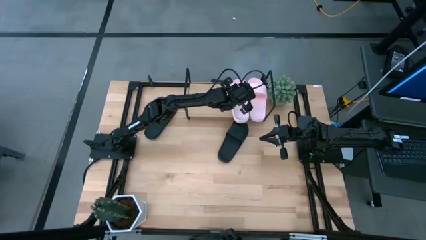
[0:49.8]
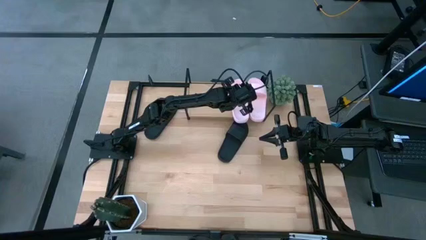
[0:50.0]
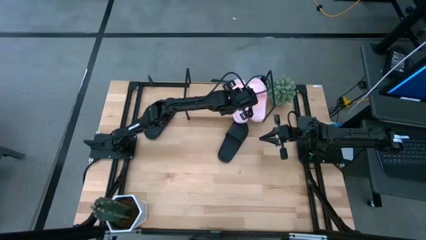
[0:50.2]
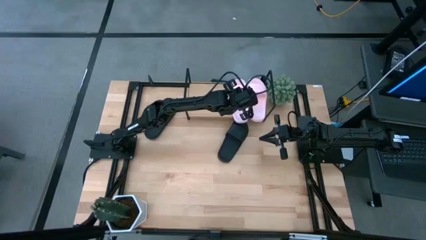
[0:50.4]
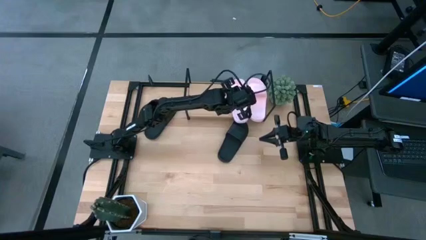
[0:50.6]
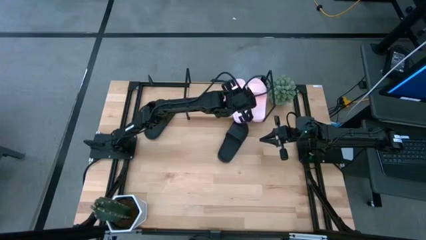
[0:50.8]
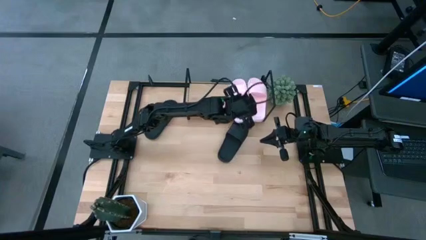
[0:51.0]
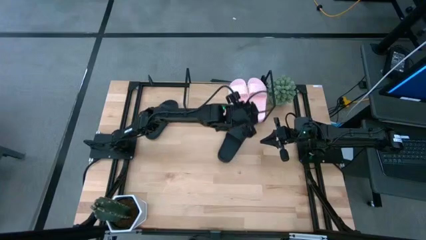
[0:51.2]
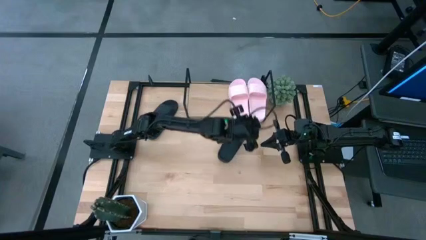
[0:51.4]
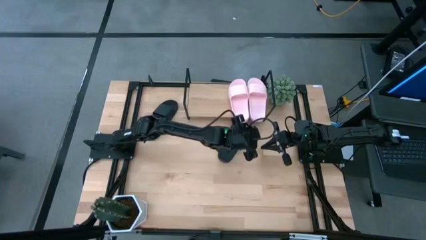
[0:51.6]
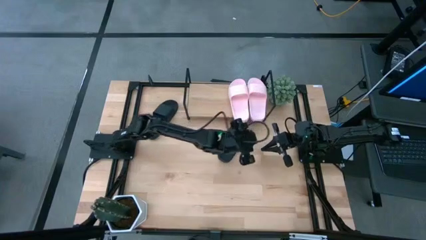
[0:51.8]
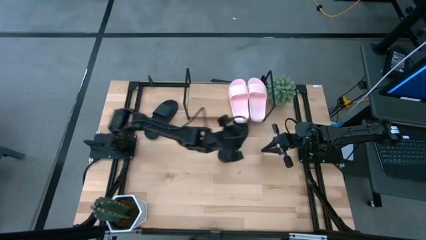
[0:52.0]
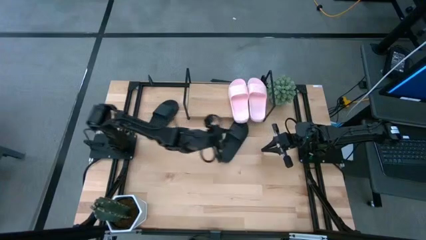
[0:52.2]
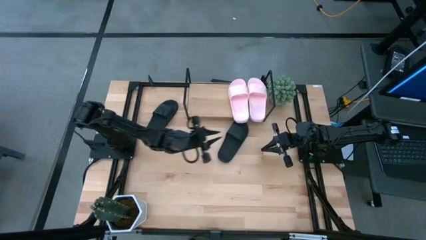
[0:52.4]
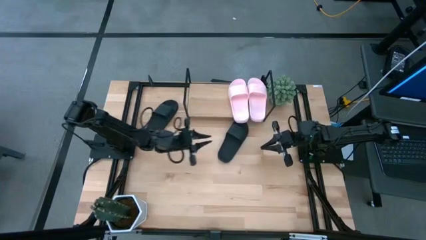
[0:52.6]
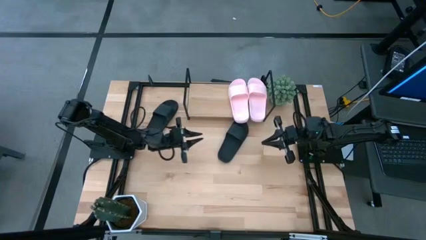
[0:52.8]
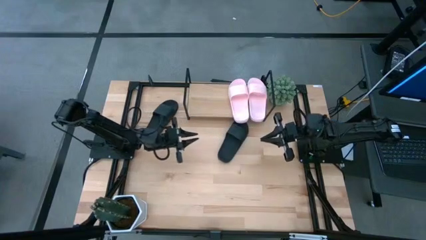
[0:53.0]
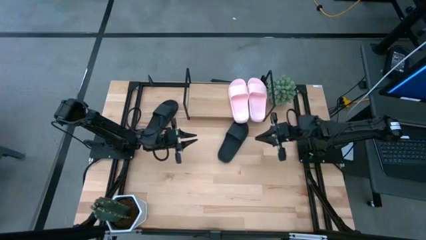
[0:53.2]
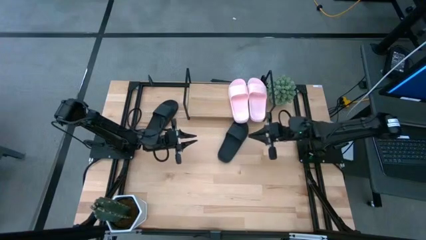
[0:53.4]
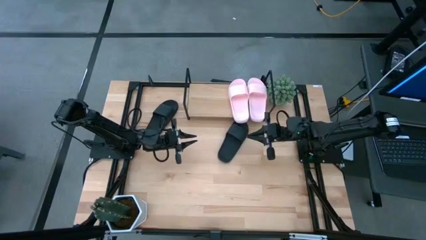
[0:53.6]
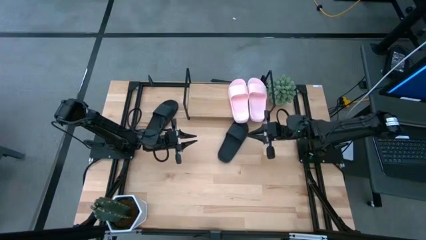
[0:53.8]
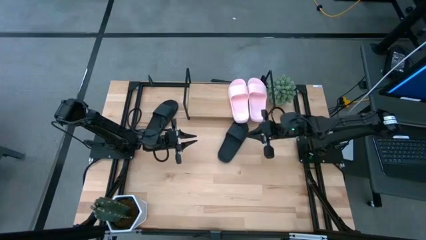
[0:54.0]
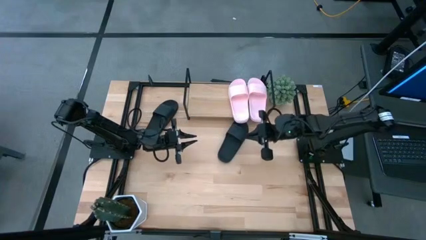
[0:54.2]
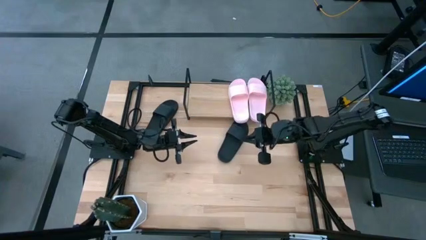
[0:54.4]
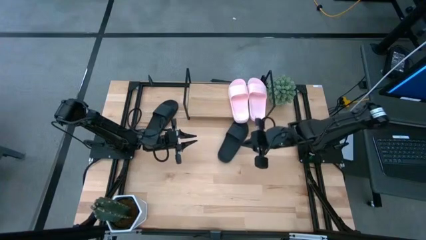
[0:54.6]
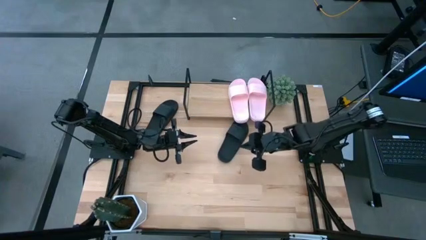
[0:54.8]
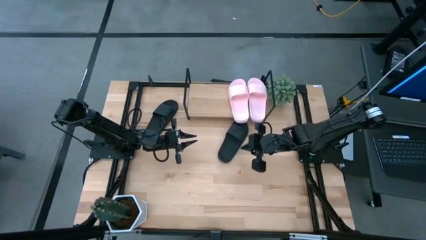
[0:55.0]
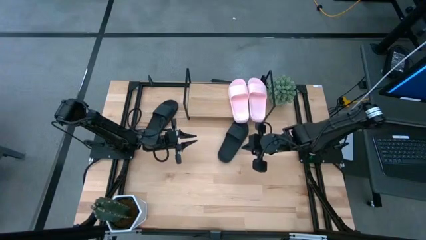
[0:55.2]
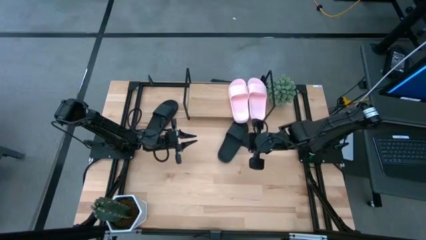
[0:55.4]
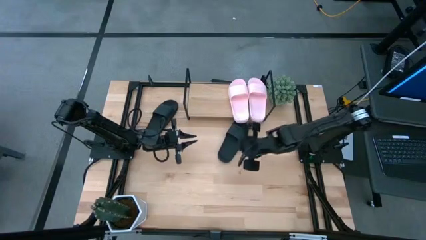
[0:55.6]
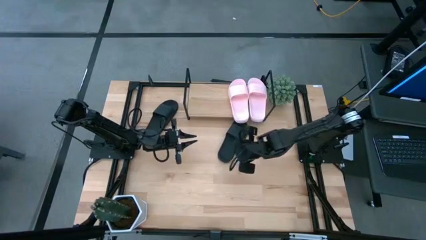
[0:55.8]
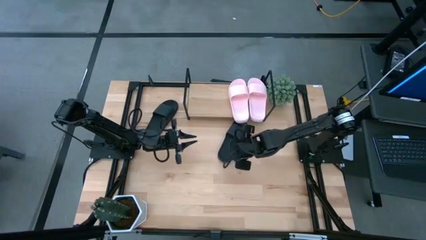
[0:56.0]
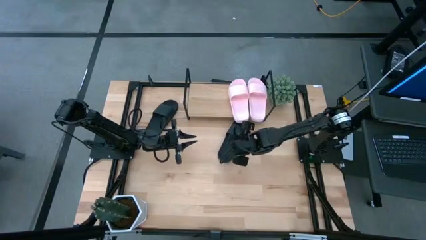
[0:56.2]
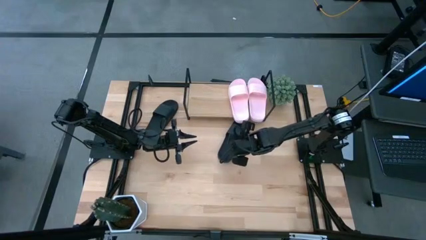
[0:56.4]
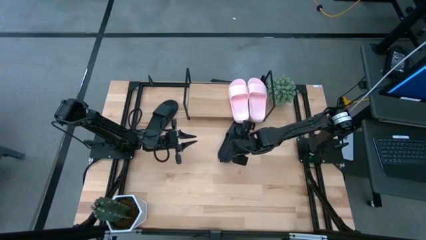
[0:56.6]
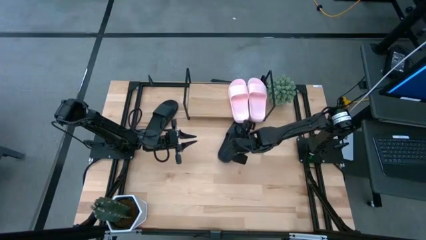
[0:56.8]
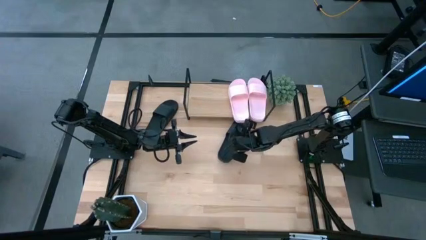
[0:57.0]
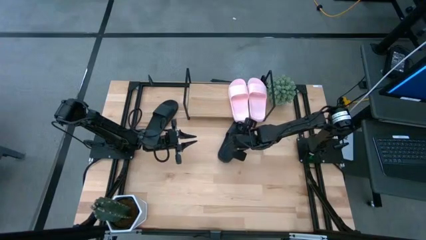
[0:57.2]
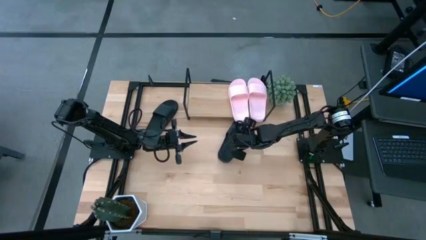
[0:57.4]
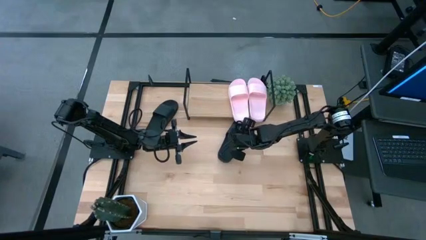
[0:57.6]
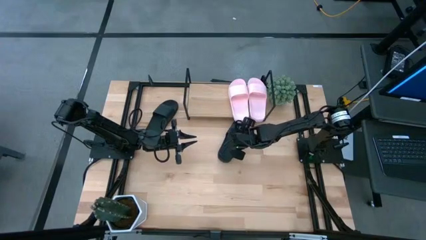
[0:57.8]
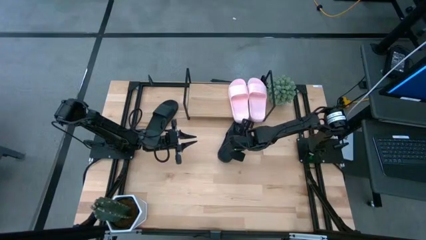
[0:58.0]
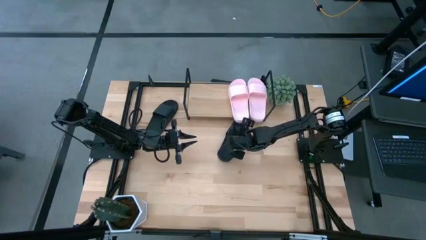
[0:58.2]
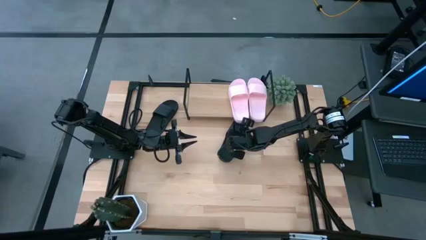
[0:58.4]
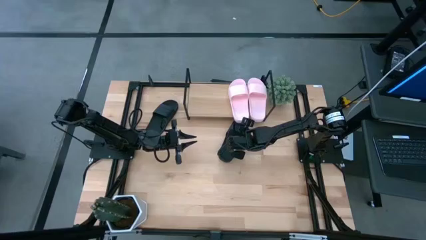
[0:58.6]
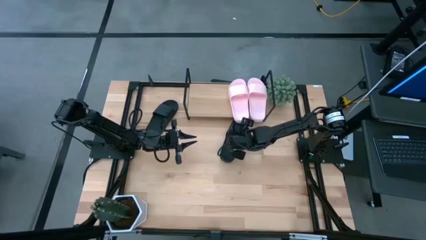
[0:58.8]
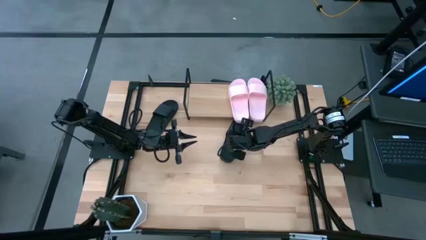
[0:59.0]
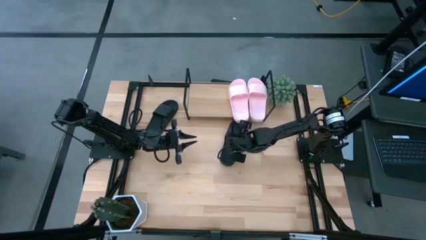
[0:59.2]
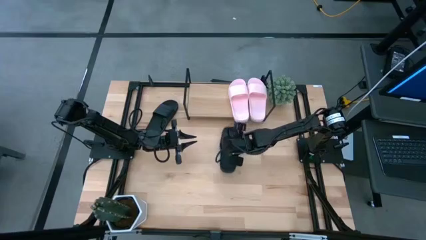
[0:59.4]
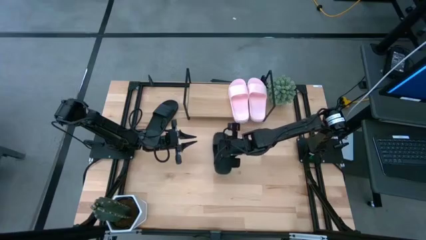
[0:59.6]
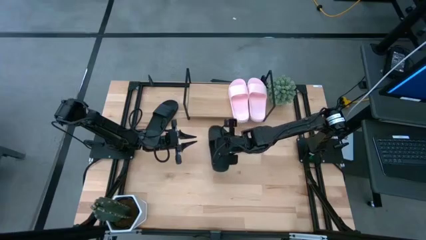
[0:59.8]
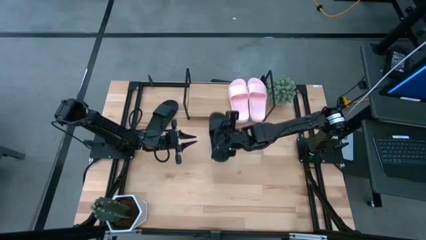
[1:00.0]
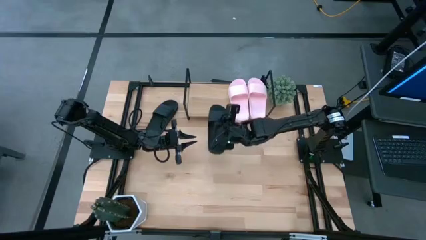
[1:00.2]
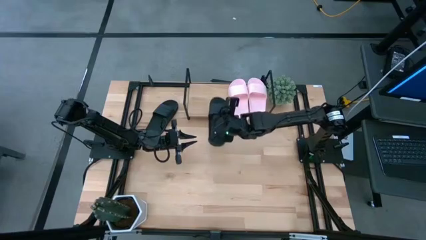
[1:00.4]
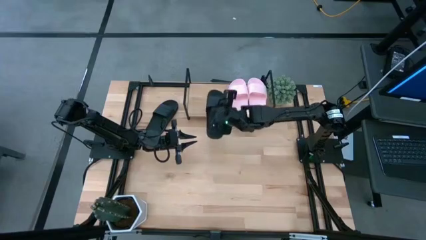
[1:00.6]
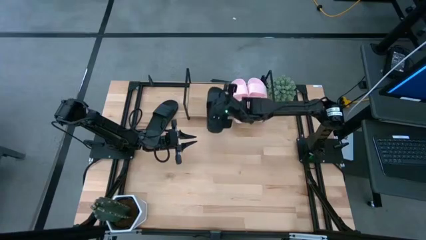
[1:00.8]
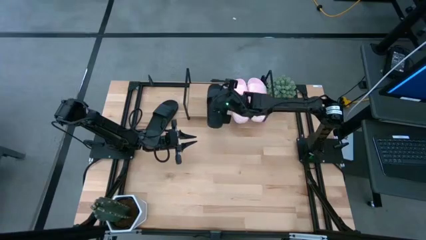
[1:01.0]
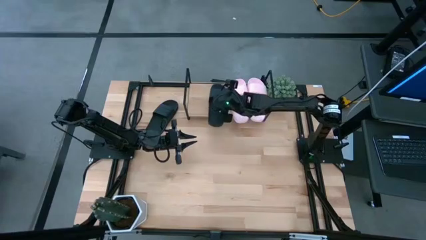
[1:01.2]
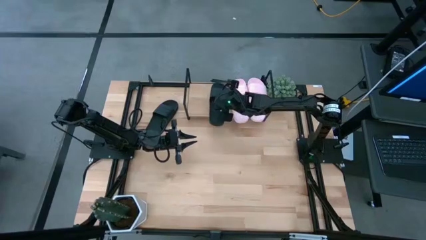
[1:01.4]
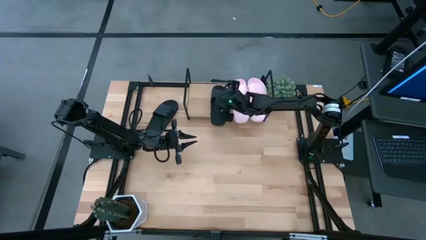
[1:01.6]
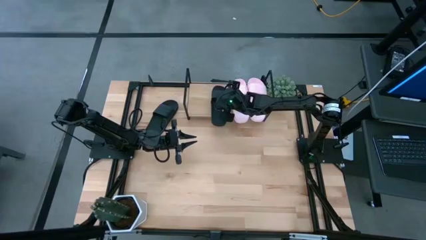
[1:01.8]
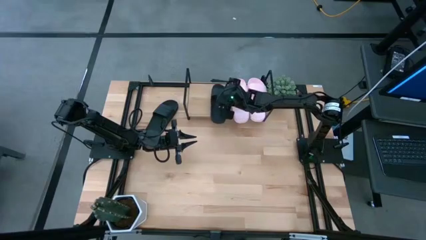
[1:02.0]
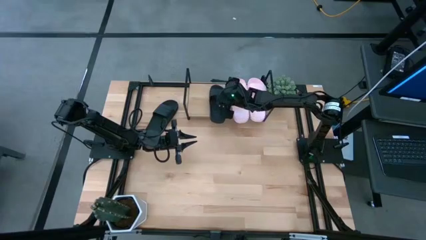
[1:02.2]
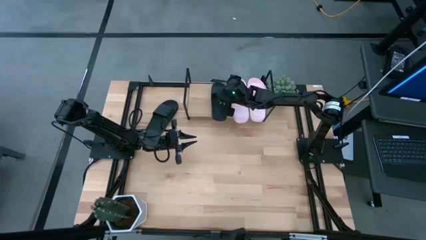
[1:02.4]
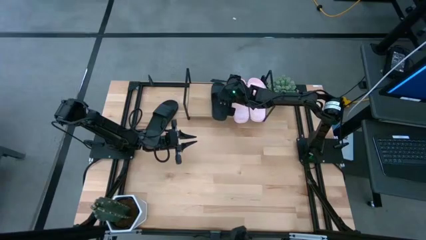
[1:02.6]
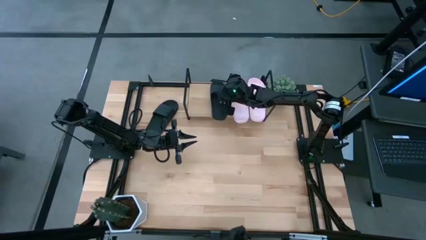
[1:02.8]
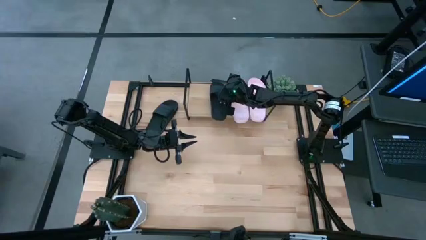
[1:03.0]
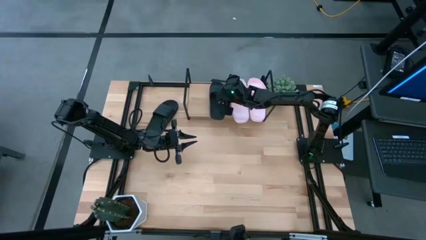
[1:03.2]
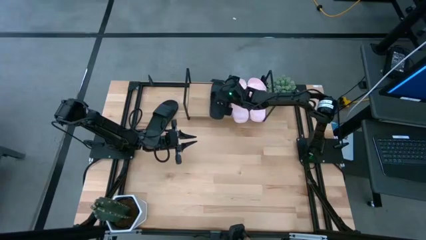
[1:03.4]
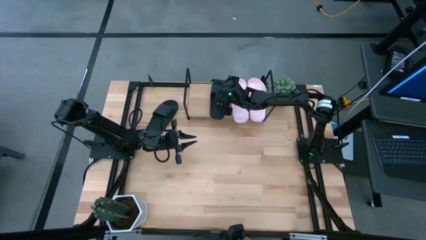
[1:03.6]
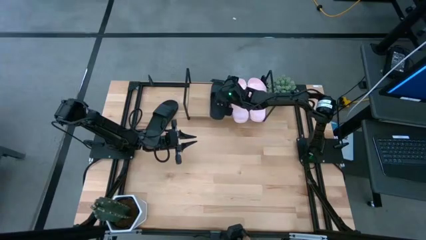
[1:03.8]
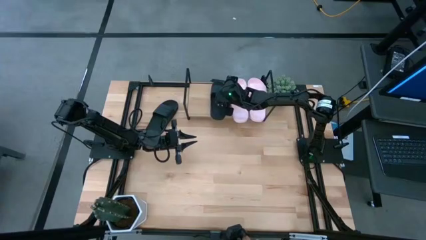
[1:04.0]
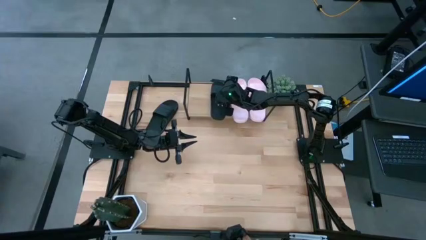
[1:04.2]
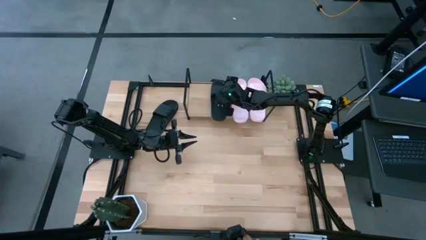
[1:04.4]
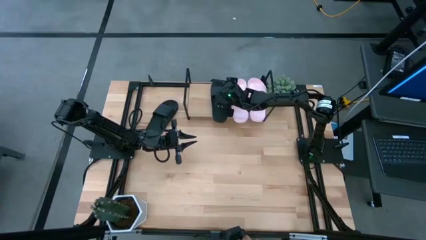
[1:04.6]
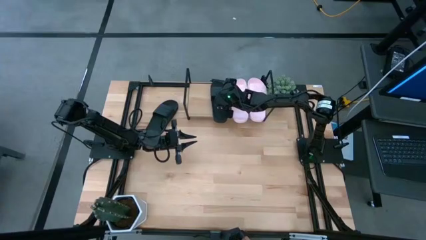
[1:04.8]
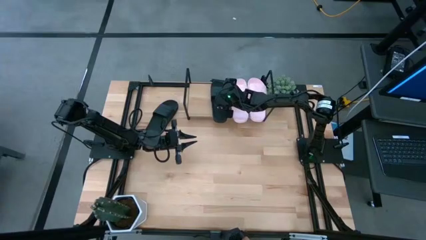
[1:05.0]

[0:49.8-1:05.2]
Task: Pick and place slides into the shelf
Put the right black slipper on the shelf

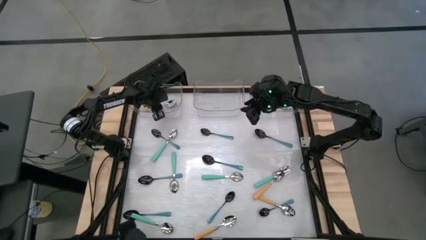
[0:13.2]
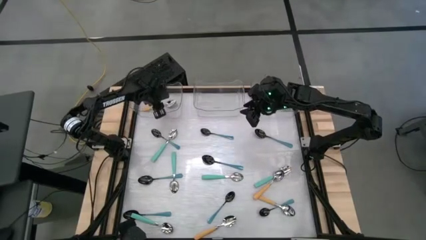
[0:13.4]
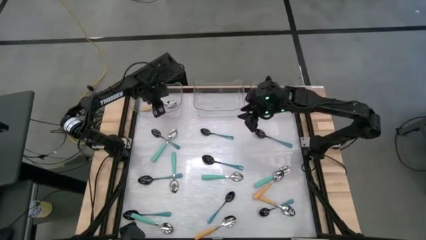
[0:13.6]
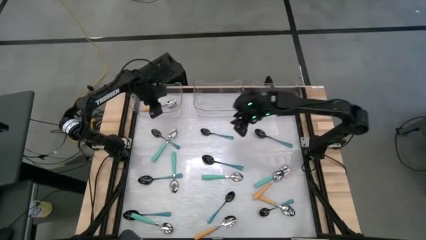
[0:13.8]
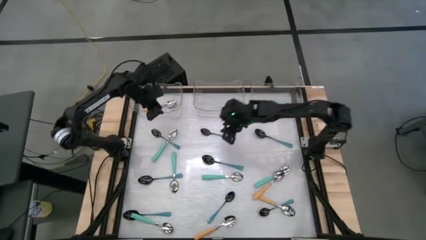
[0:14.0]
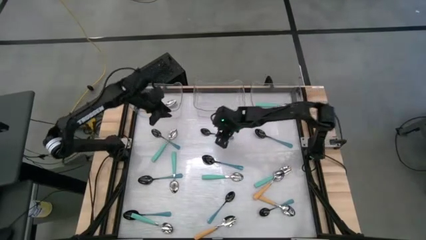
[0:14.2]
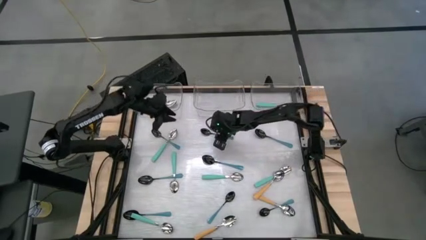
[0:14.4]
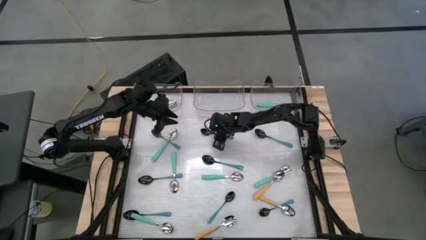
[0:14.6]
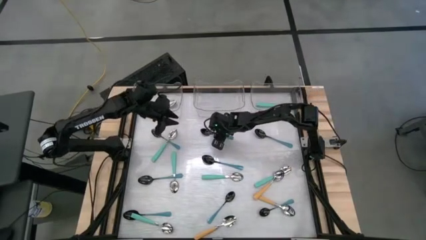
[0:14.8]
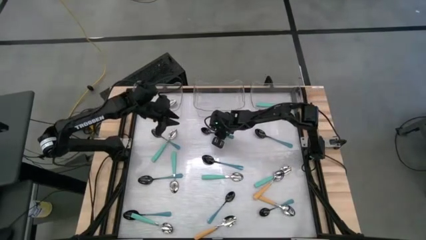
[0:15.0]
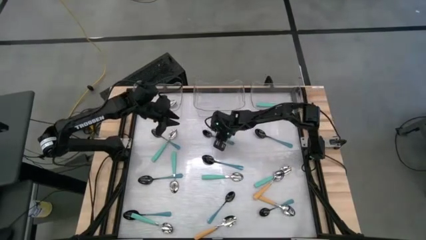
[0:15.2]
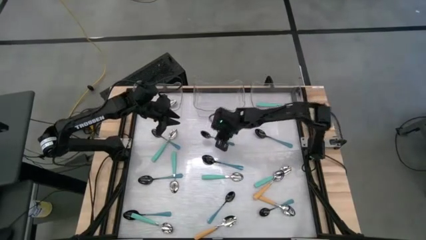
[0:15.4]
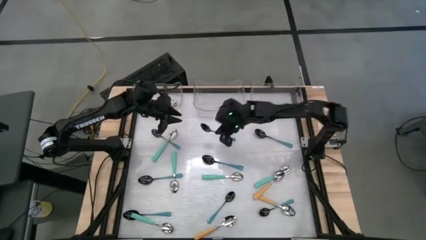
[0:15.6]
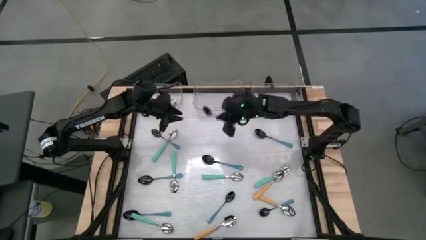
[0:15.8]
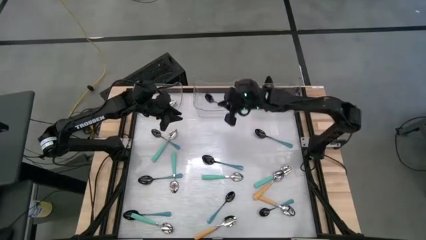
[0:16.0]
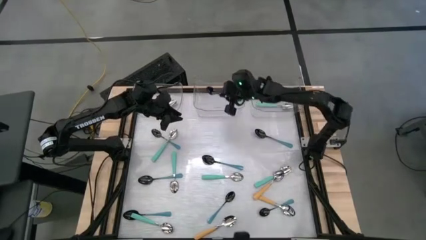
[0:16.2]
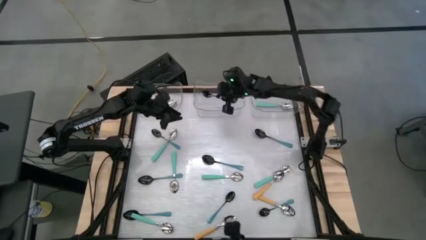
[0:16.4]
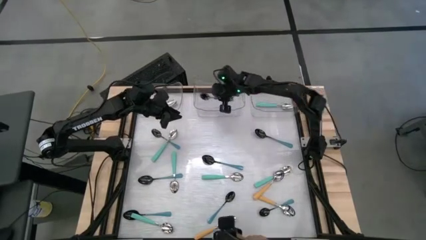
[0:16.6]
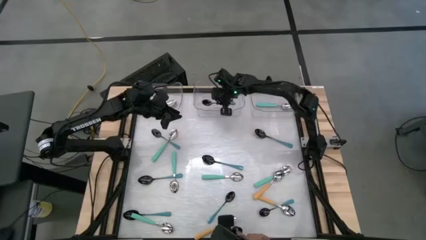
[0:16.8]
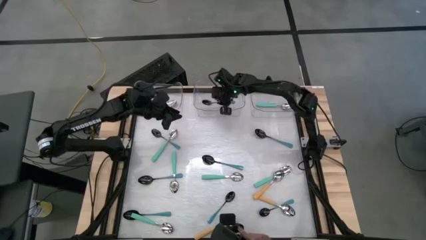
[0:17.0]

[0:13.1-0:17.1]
Task: Sort silverware by color (type)
Put the blue spoon into the middle transparent bin
